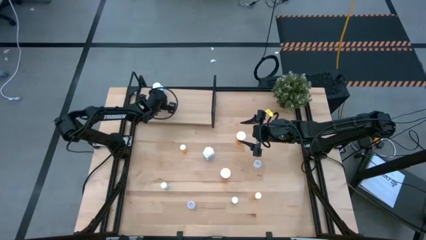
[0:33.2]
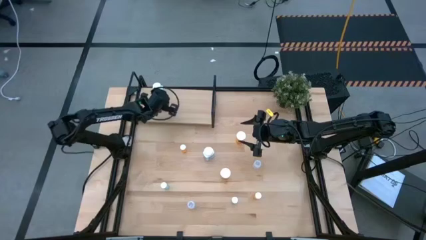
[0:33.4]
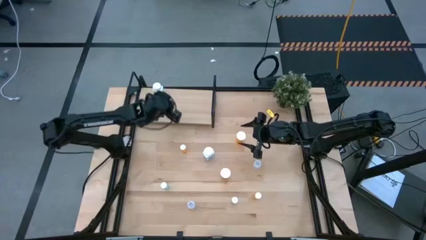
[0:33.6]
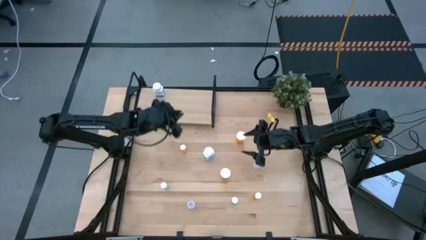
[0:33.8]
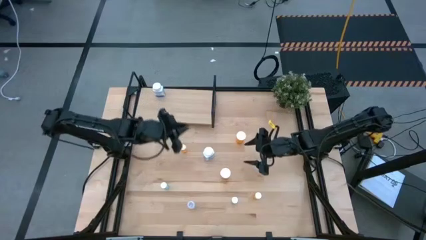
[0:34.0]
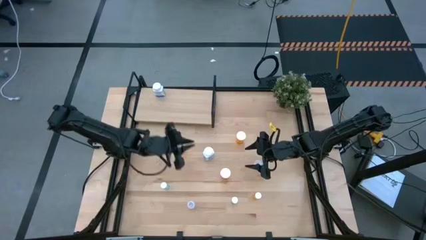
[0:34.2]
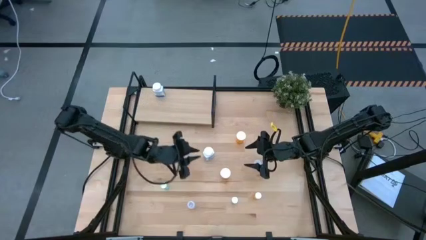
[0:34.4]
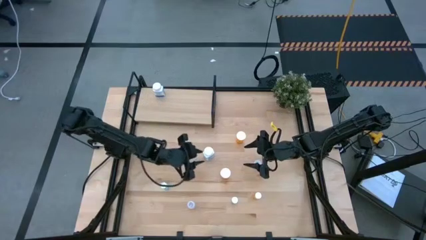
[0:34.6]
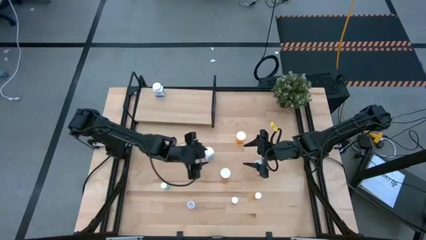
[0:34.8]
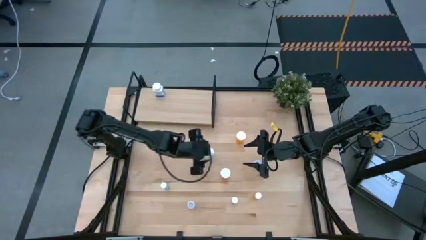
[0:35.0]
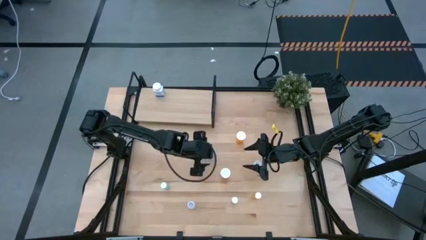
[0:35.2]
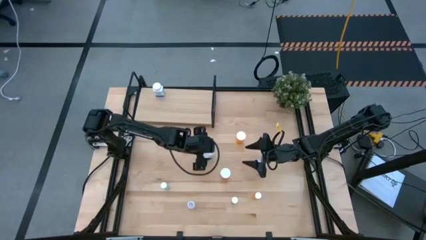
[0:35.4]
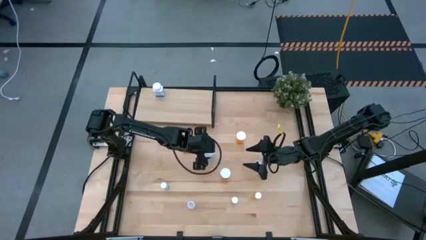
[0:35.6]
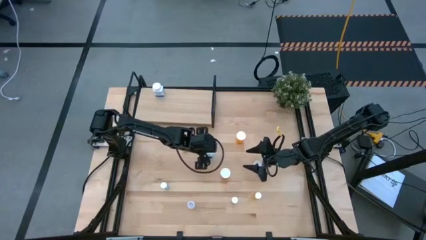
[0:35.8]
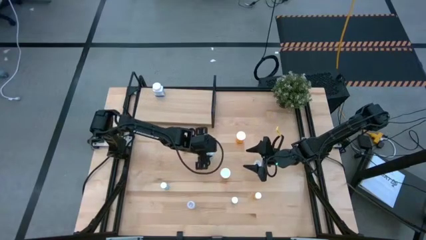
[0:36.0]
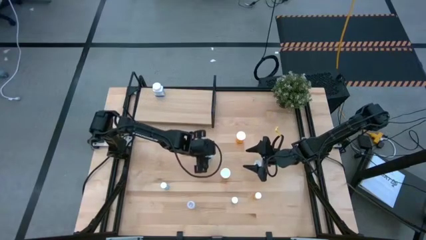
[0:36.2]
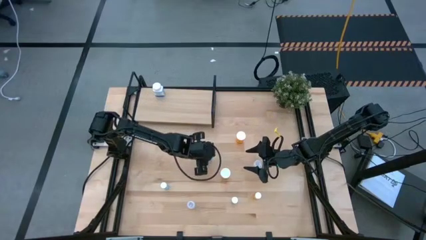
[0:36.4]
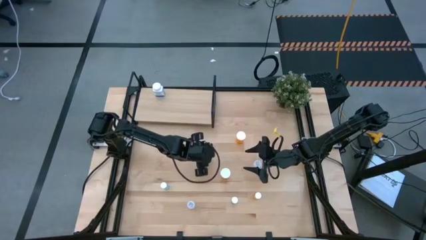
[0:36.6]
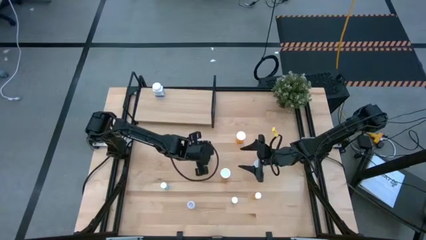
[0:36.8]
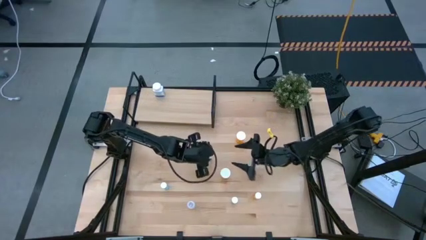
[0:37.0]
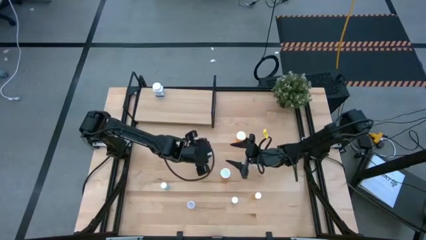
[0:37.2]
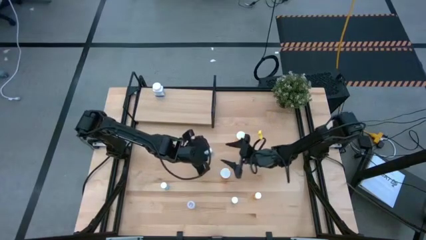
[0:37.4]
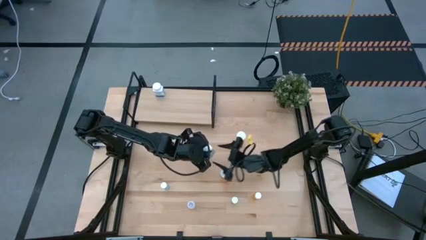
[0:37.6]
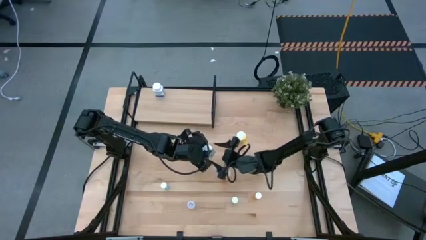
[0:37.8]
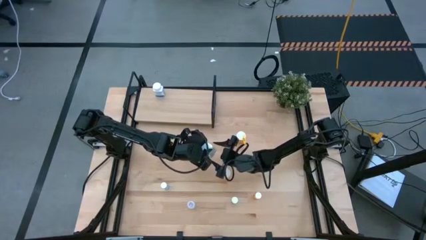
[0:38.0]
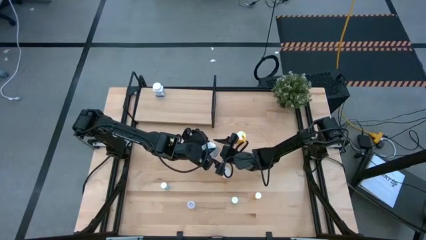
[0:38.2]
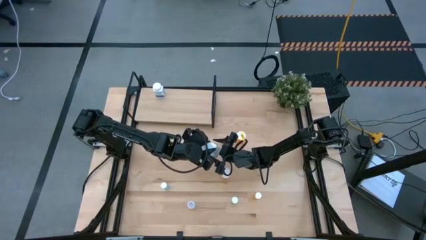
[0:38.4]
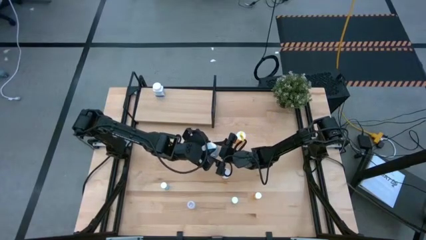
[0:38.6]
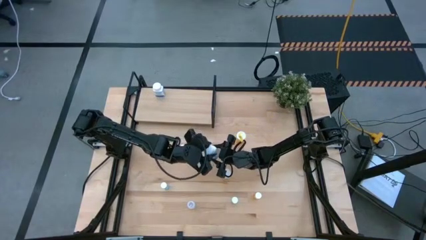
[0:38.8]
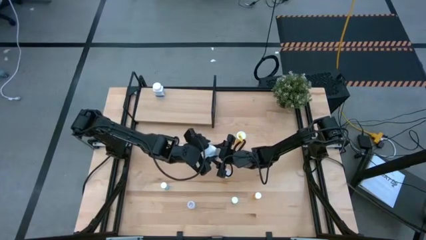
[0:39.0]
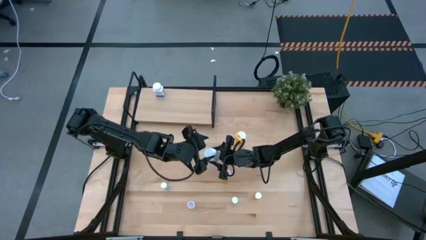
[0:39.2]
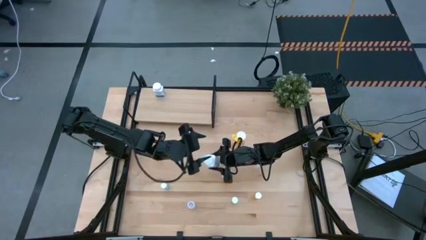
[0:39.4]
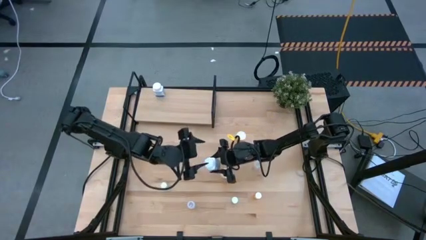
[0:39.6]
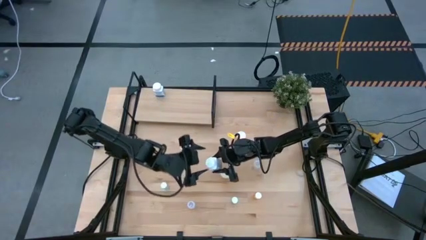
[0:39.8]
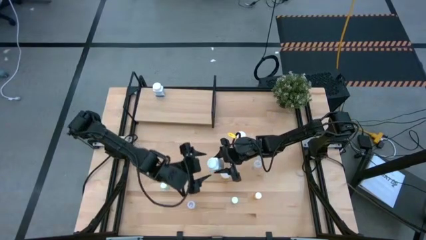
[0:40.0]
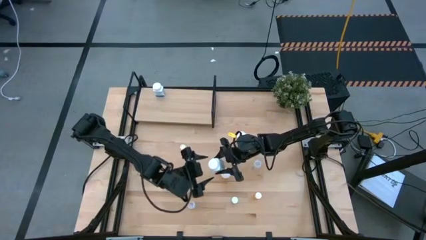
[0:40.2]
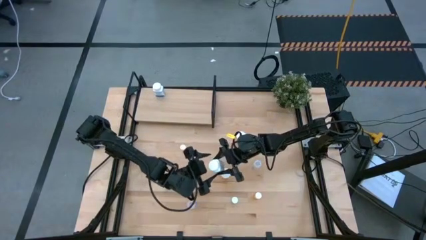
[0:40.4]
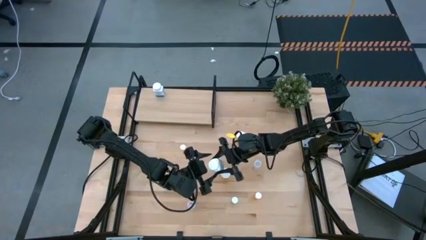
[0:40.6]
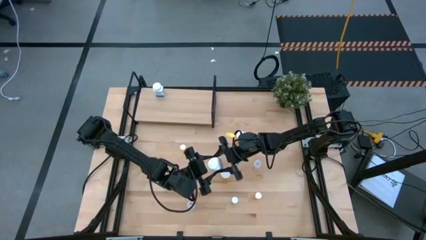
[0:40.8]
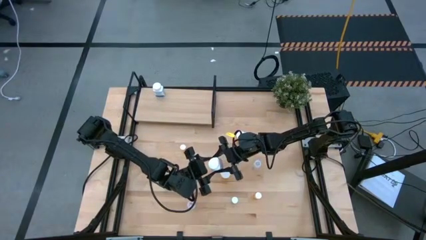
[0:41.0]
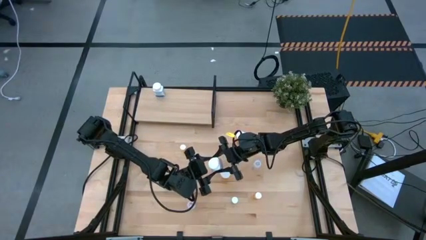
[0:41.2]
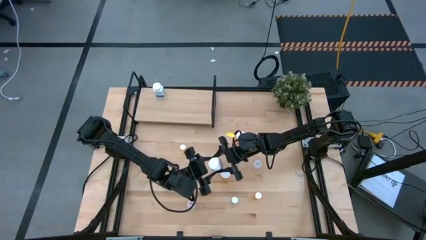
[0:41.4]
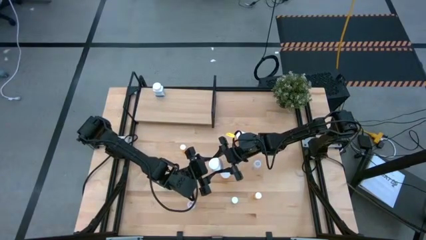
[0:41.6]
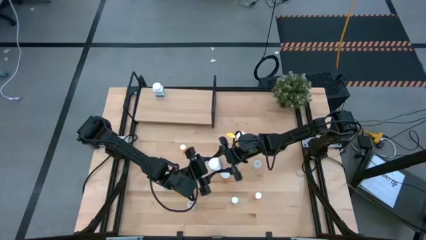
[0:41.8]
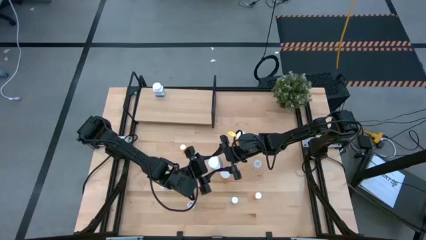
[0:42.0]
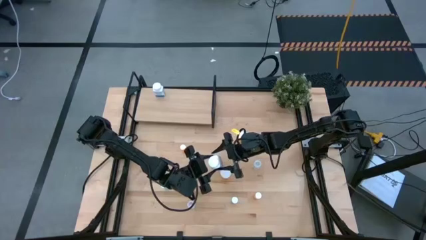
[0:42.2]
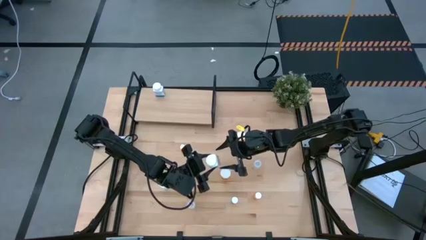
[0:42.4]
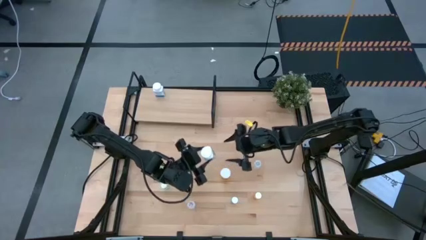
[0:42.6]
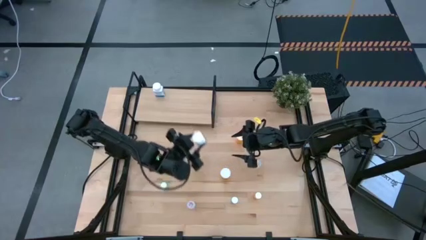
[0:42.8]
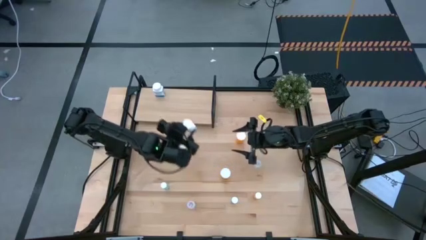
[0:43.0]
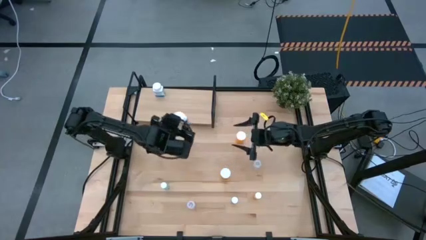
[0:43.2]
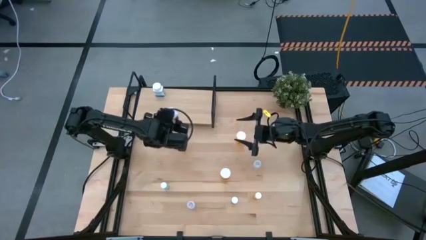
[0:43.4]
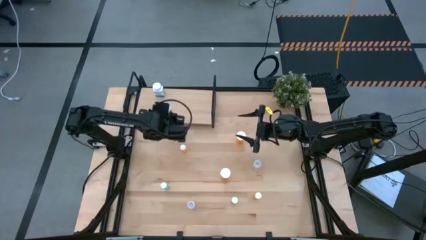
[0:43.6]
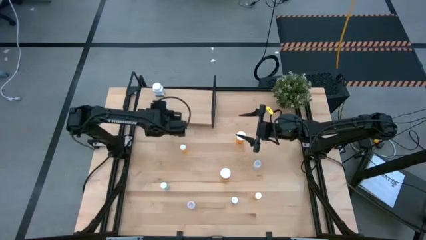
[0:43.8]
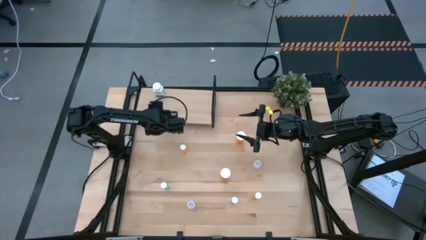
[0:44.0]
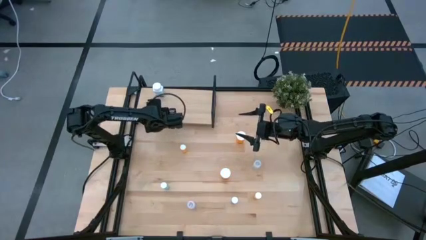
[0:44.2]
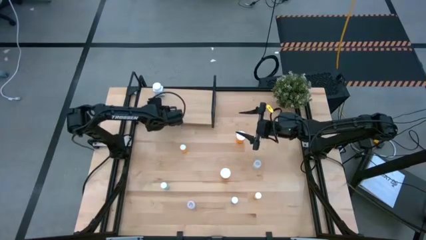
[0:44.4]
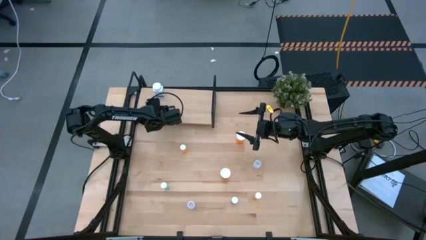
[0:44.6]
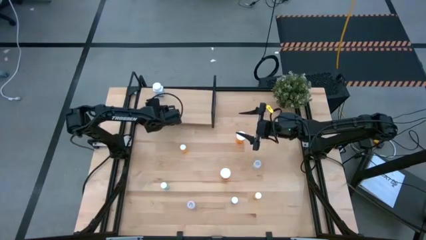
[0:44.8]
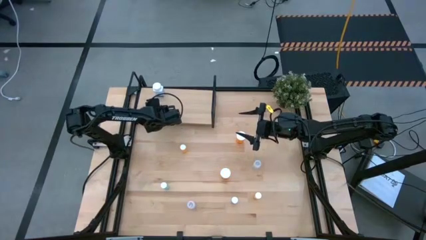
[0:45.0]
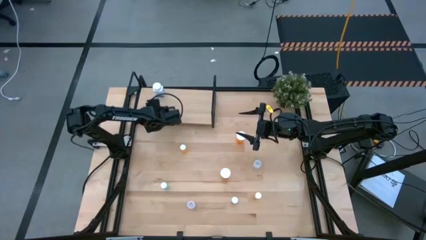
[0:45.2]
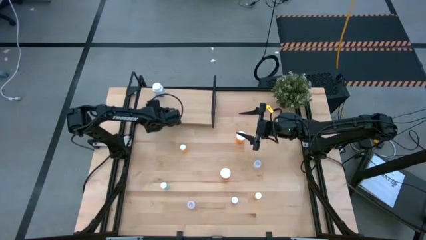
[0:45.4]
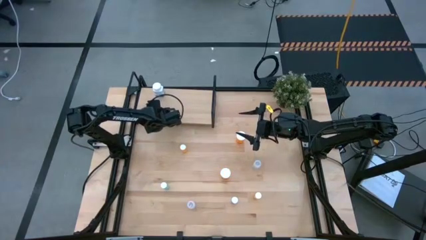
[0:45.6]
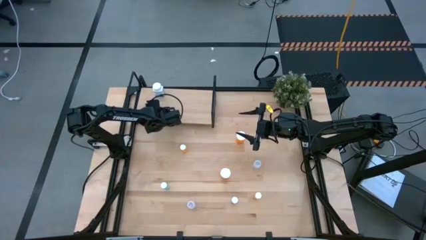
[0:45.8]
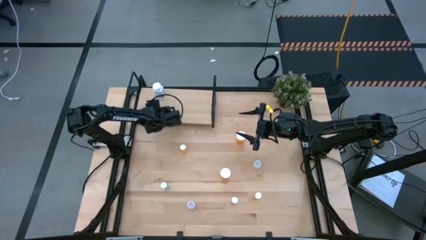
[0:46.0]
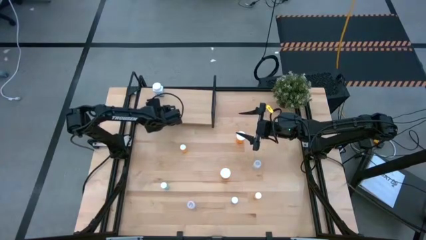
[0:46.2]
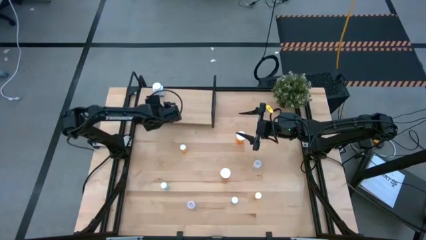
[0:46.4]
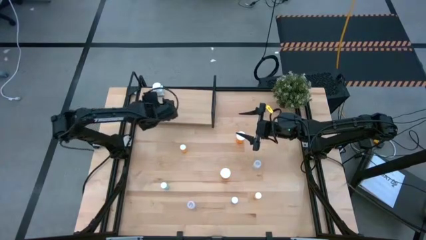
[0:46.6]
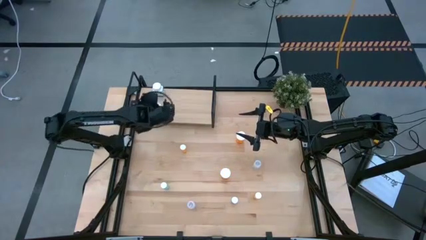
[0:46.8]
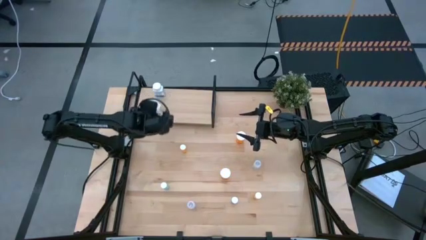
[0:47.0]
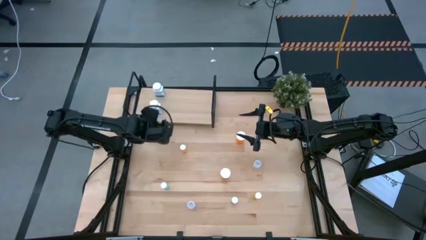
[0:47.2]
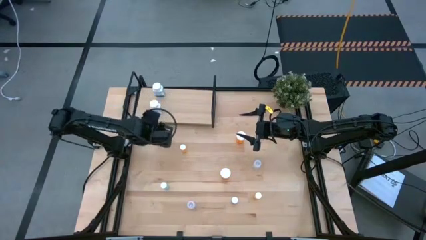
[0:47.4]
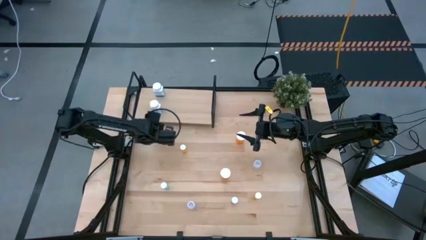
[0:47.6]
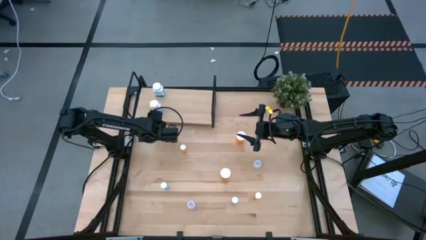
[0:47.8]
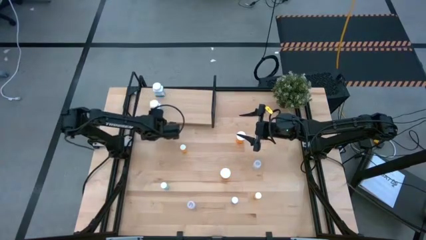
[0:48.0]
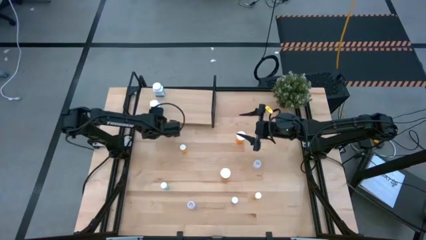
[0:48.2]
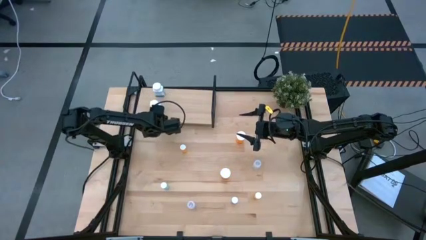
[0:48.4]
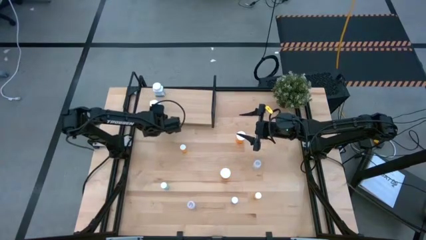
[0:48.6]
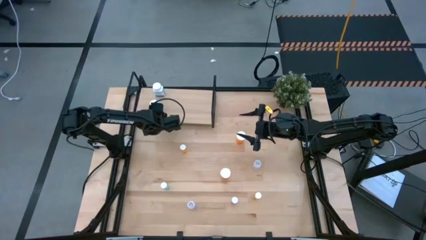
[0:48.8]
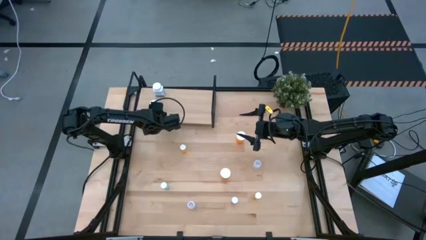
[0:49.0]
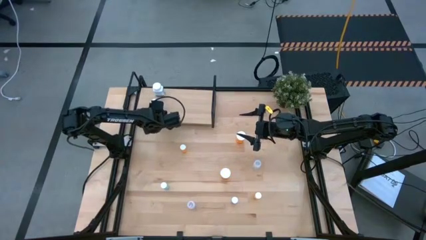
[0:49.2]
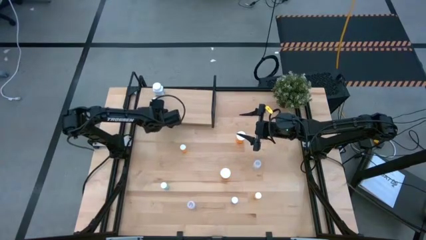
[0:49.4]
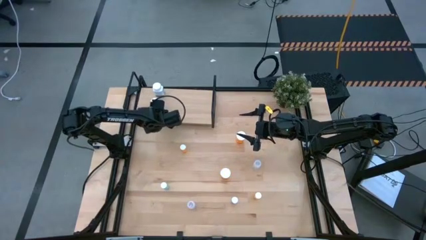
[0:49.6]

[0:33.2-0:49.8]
Task: Pick and place medicine bottles onto shelf by color
Put the white pill bottle aligned with the other white pill bottle on the shelf
